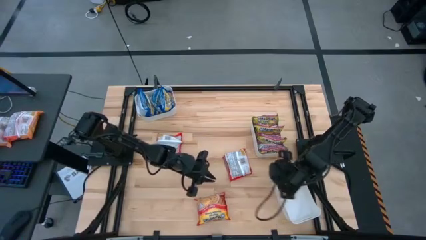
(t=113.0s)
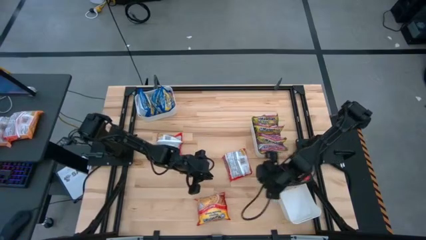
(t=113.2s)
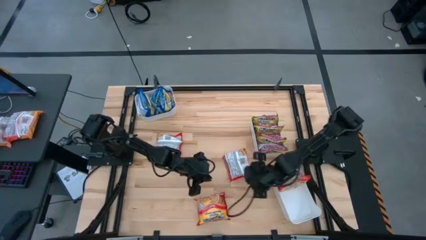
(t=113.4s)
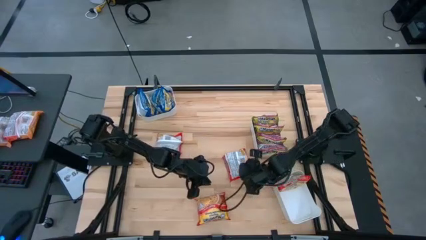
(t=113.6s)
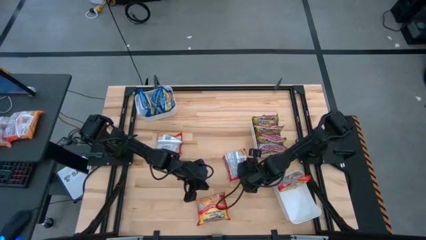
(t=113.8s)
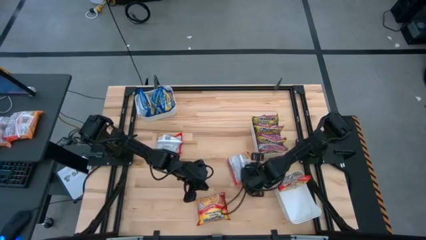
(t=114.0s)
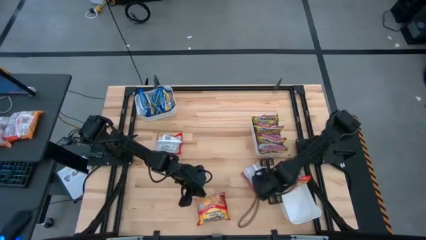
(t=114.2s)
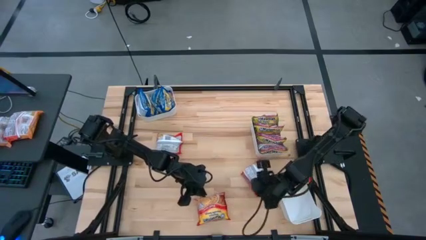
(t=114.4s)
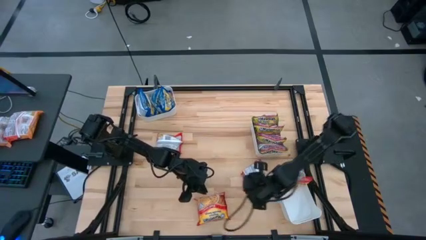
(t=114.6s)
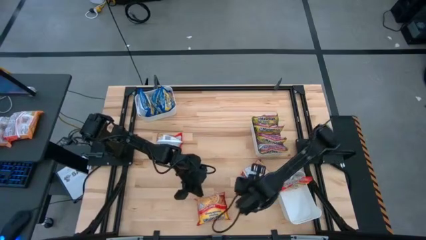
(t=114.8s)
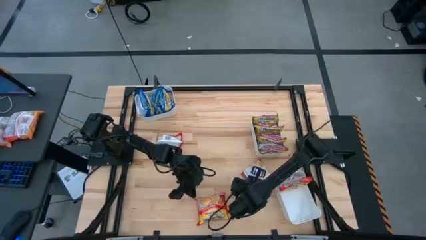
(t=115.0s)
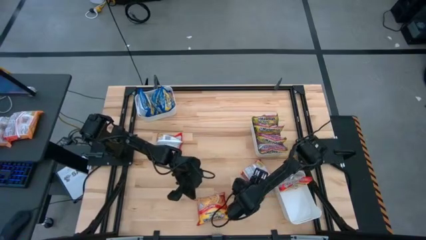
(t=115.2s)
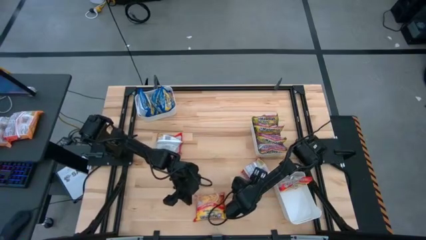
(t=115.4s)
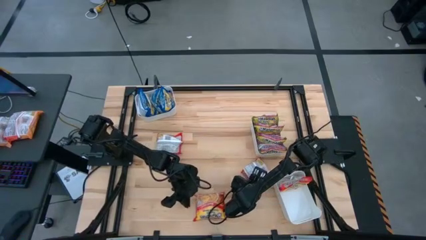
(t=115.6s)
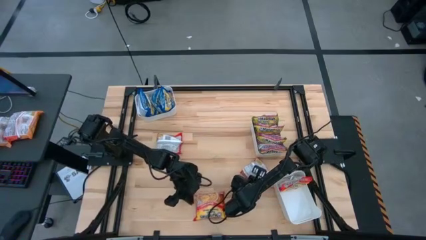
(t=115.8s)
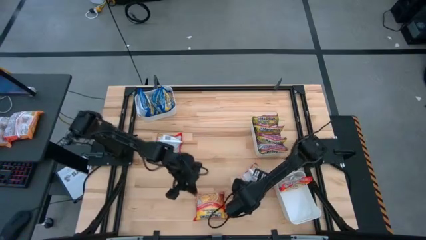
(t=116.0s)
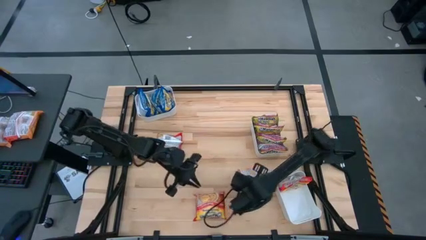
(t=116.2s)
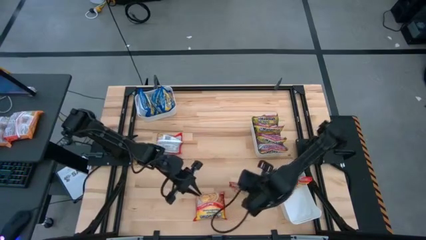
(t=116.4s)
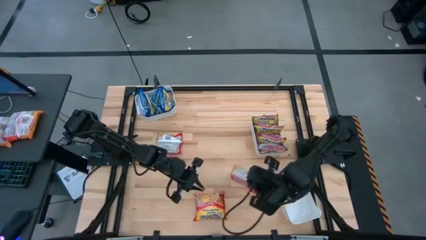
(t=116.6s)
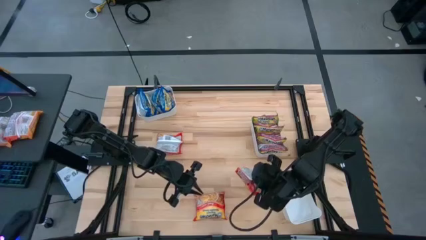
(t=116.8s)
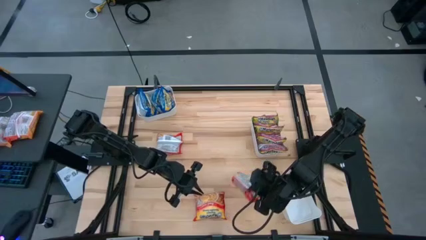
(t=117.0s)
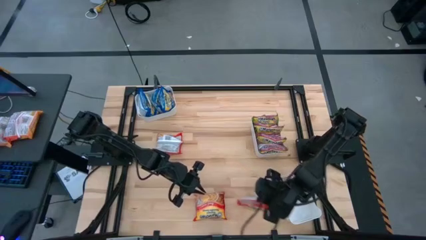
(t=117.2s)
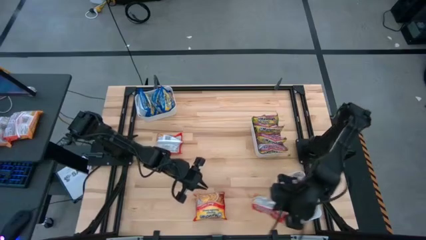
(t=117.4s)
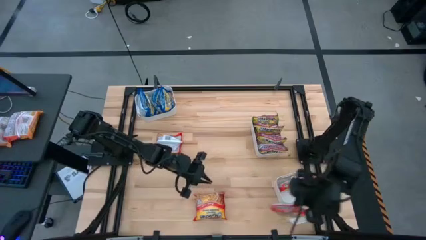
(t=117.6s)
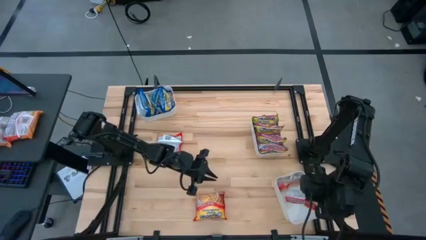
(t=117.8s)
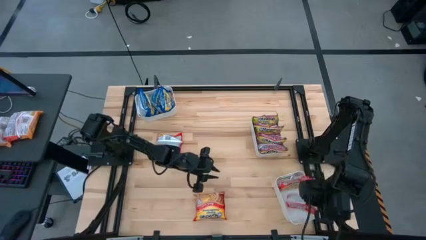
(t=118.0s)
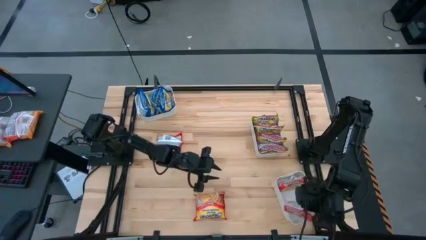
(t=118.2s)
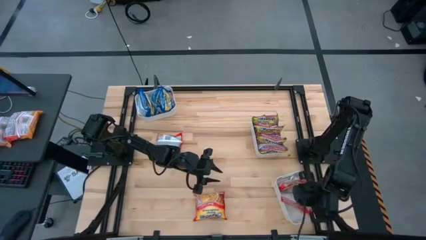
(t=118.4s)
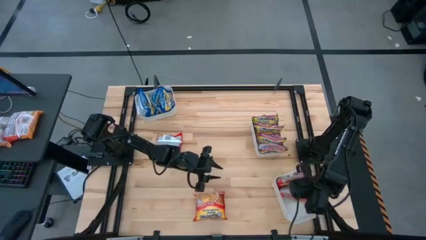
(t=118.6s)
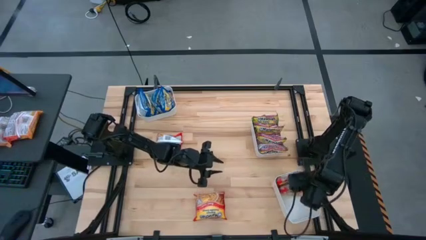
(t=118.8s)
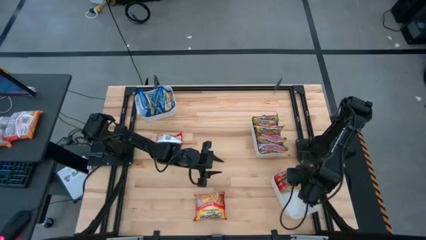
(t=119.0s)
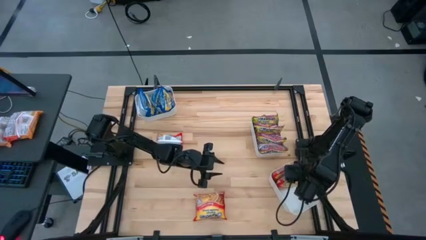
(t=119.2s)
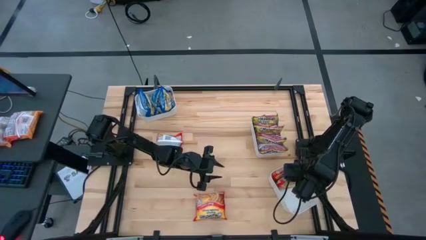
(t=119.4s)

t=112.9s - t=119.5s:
Task: Sort Maruchan noodles
Put the red noodle pack into the bottom right white bin

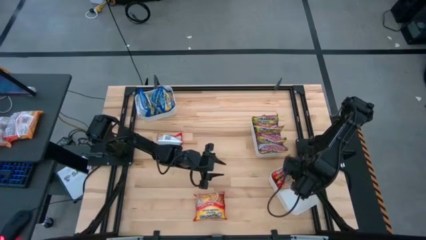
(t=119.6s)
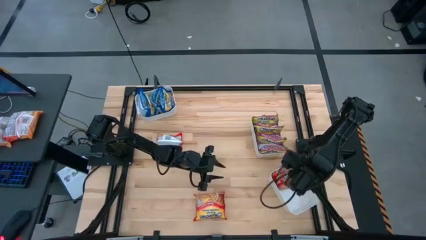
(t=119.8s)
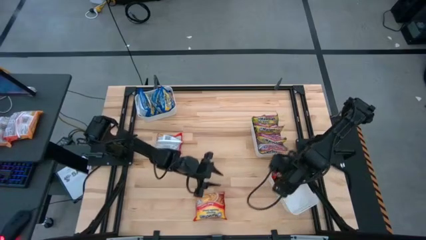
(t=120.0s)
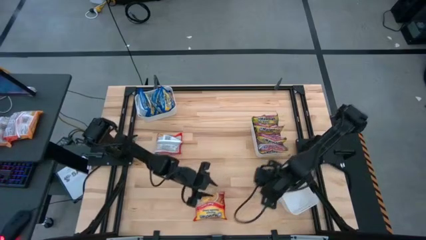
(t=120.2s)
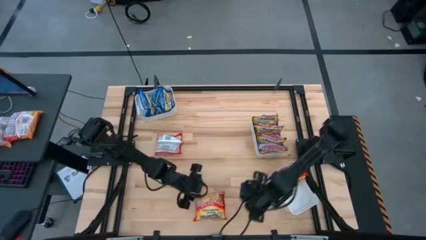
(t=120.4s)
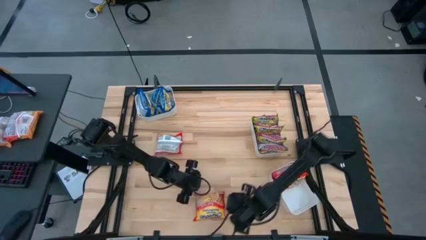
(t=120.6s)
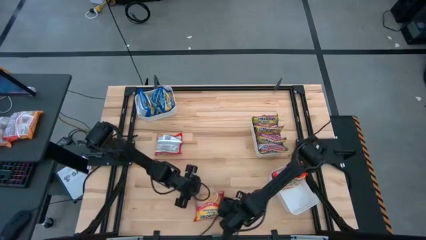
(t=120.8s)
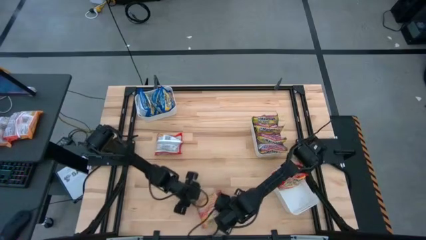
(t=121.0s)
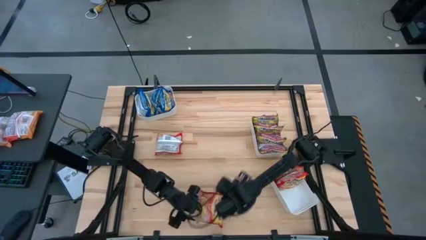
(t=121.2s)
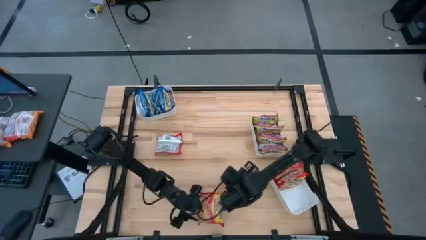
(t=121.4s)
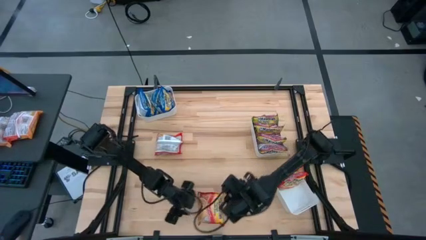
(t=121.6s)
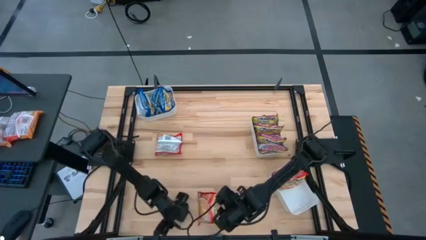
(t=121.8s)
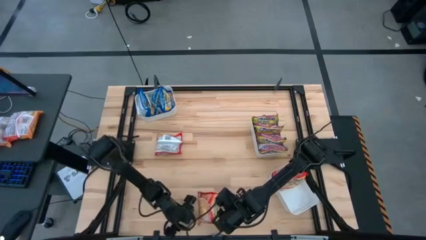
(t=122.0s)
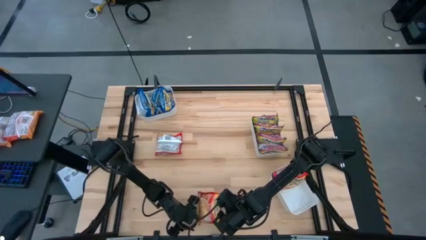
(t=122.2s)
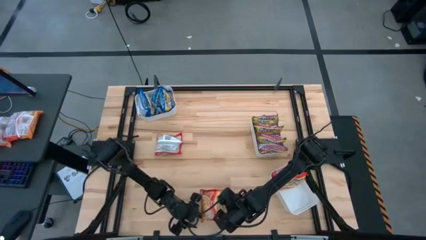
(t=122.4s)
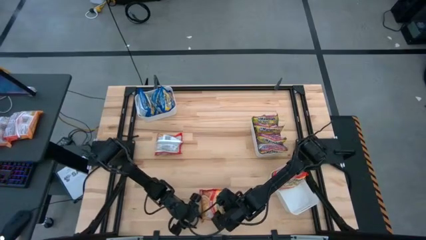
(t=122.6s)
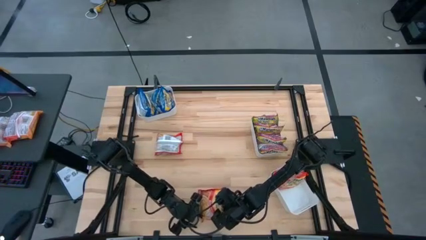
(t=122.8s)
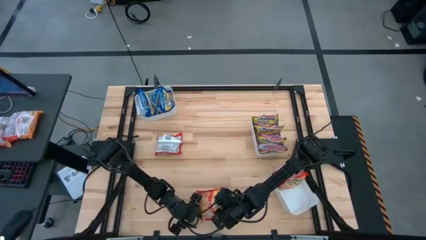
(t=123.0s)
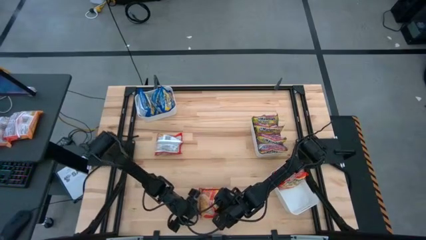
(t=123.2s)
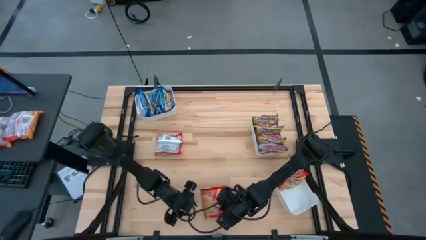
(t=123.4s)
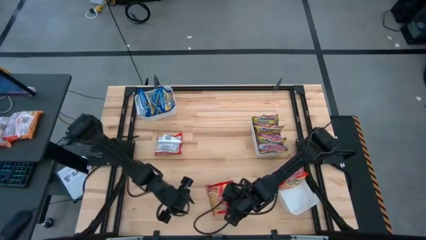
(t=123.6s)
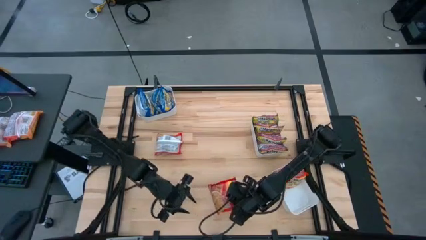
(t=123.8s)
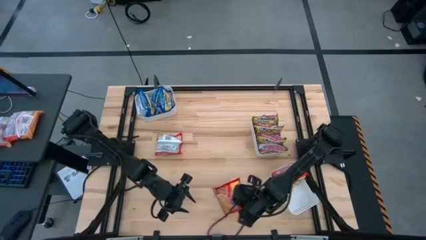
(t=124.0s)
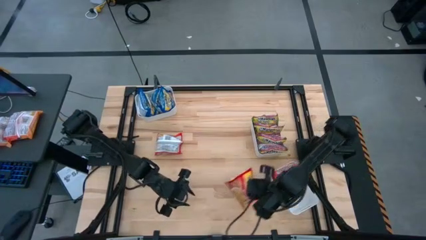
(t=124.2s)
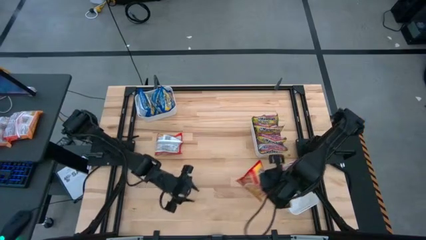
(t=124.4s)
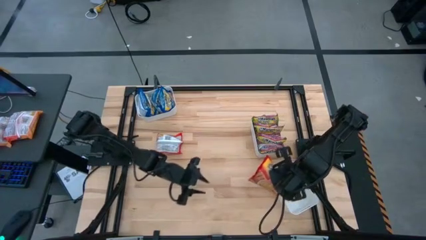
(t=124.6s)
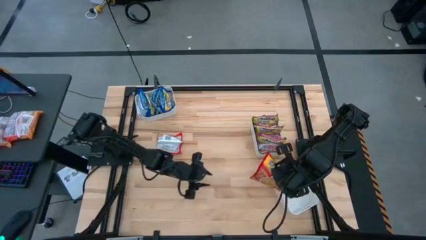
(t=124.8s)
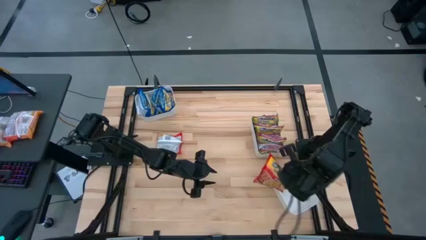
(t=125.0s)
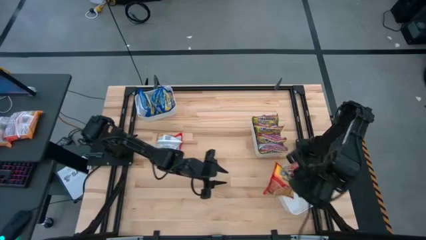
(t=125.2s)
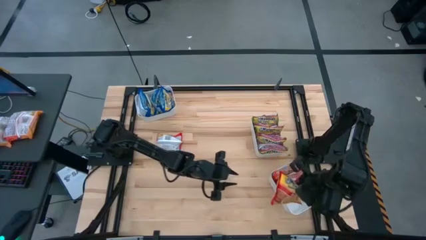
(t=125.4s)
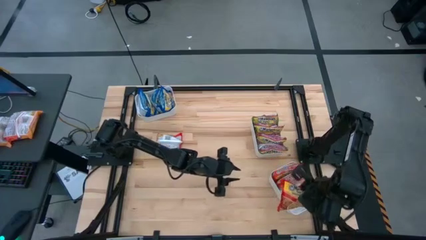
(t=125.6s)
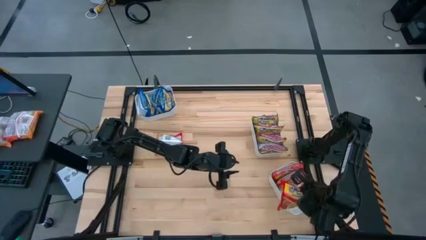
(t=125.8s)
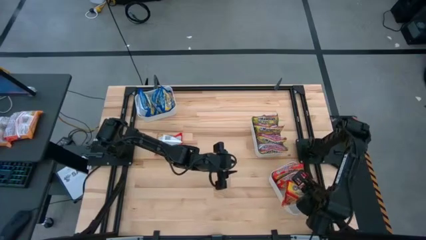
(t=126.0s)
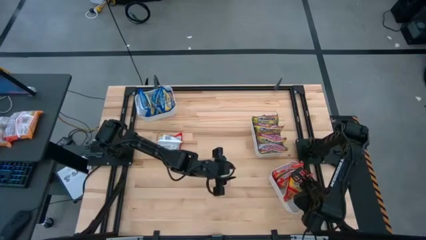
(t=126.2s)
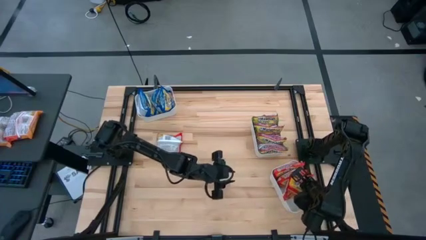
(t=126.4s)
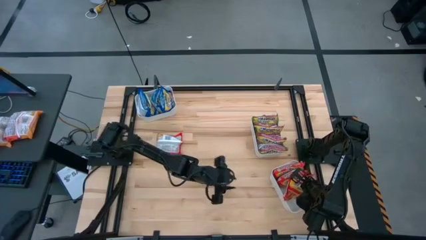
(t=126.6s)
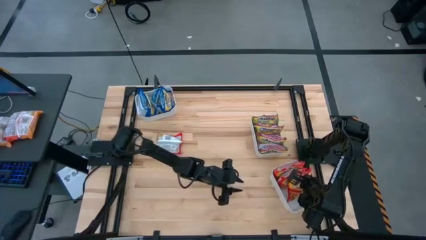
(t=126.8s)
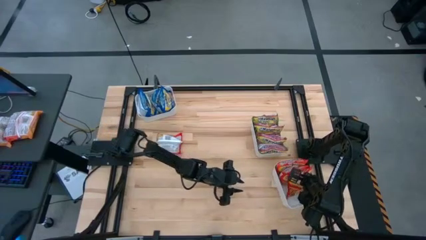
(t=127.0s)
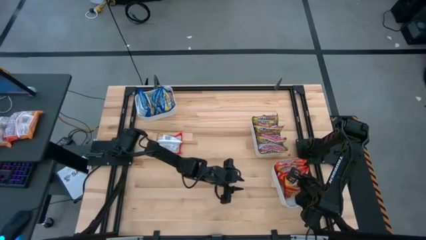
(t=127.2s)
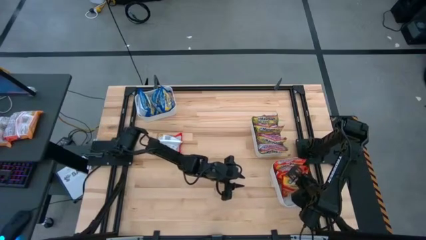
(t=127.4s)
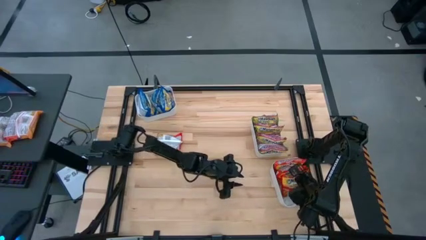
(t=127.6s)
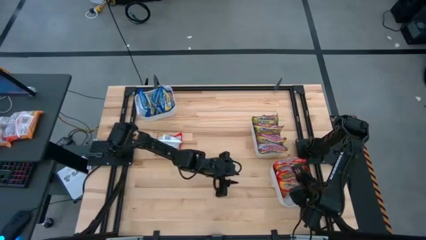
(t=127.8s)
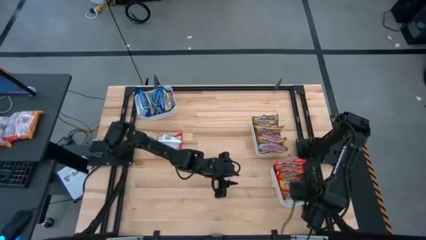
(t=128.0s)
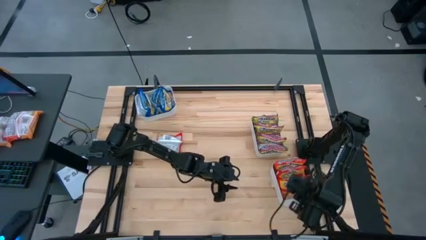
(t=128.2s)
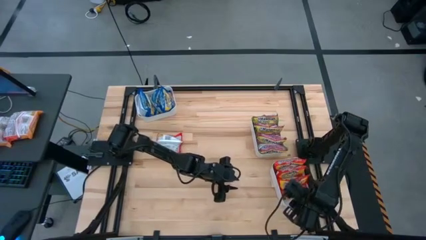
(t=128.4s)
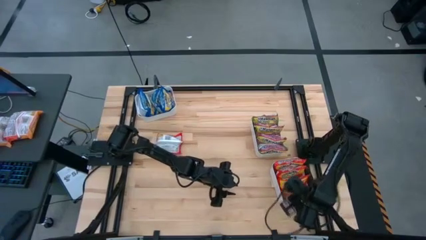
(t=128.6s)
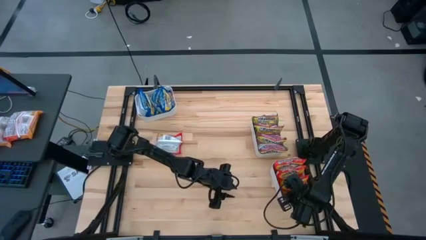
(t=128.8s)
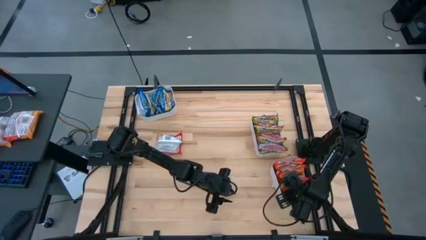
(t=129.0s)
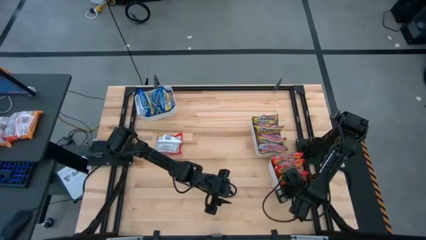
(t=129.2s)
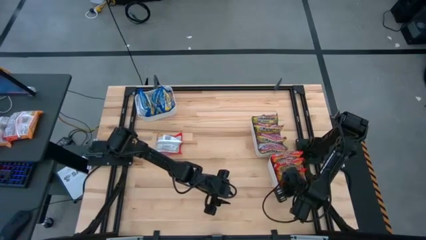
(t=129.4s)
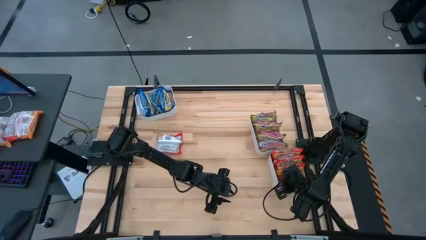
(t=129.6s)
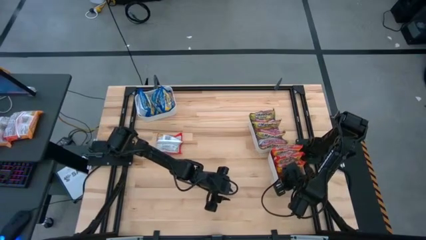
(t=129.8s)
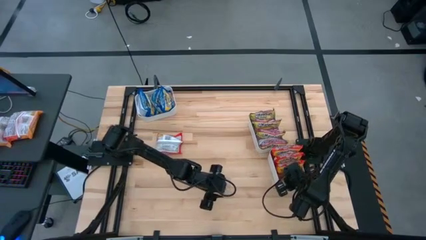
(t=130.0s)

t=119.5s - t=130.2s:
Put the red noodle pack into the bottom right white bin
